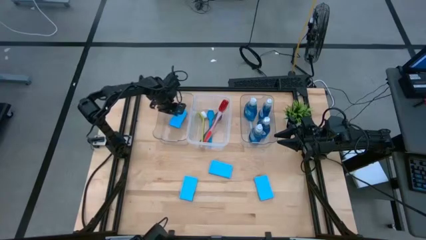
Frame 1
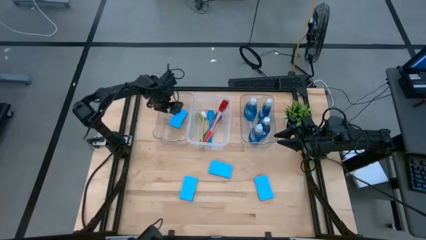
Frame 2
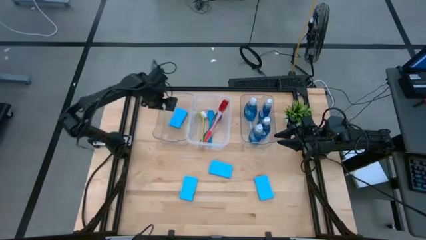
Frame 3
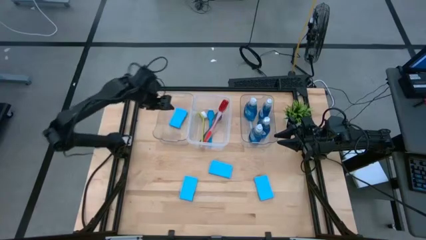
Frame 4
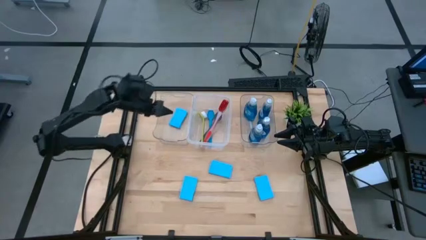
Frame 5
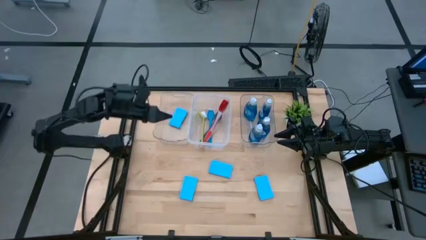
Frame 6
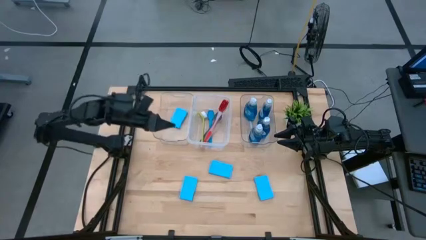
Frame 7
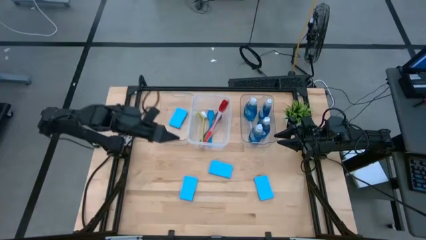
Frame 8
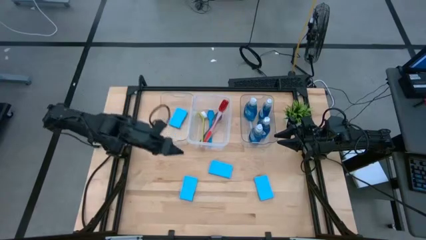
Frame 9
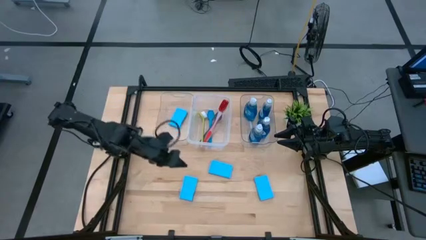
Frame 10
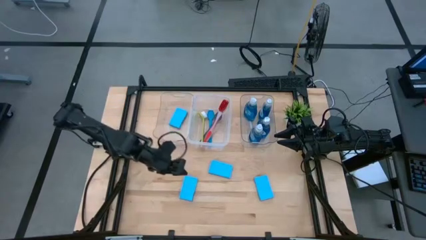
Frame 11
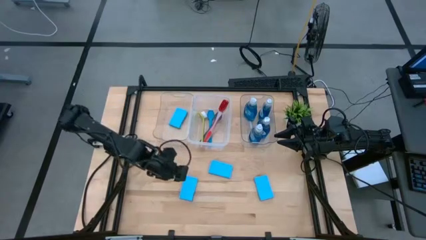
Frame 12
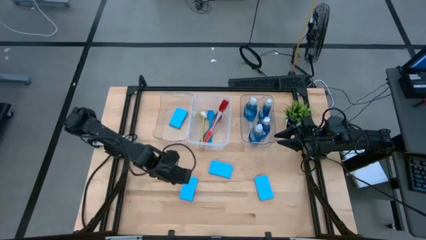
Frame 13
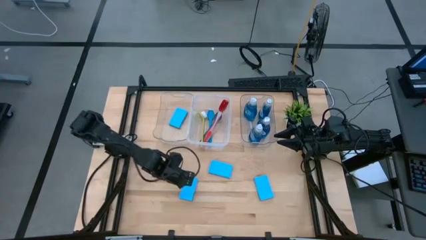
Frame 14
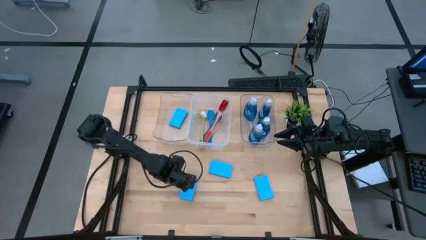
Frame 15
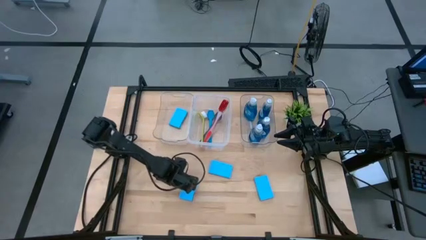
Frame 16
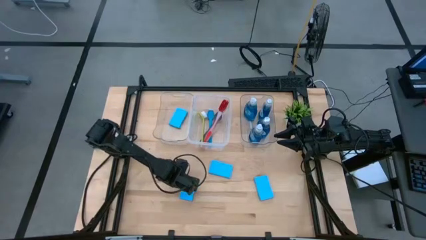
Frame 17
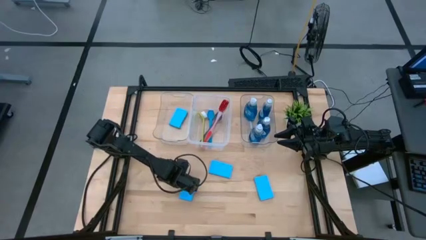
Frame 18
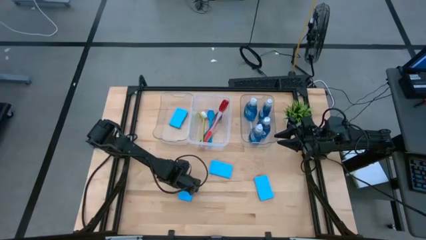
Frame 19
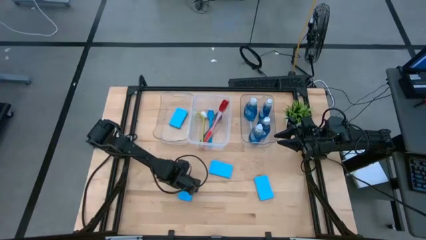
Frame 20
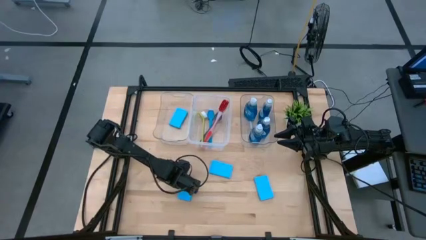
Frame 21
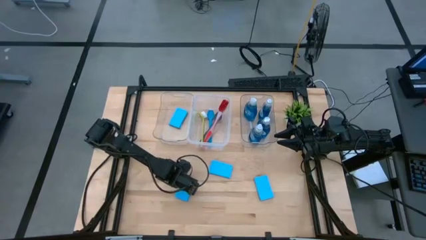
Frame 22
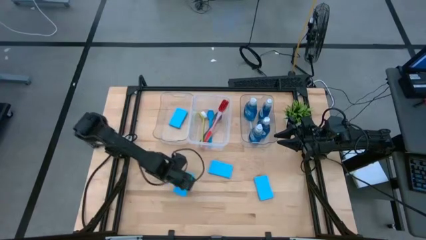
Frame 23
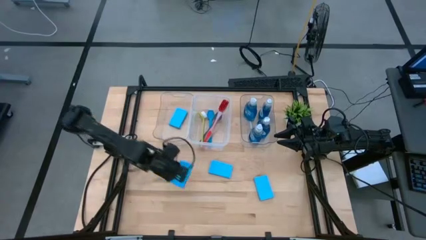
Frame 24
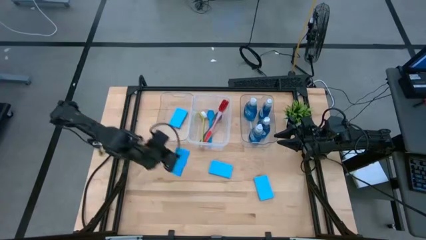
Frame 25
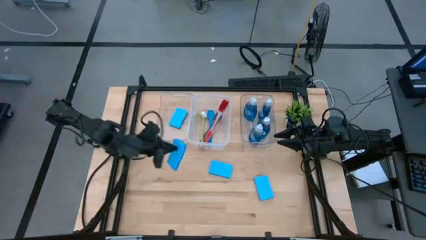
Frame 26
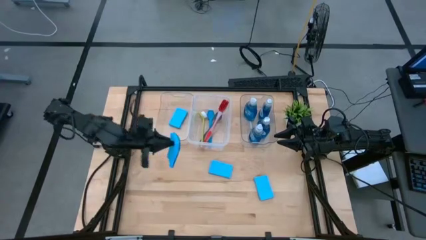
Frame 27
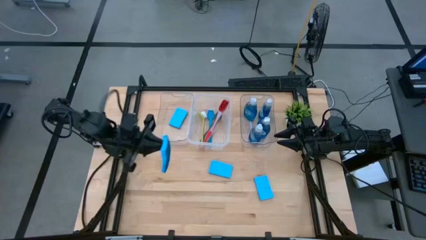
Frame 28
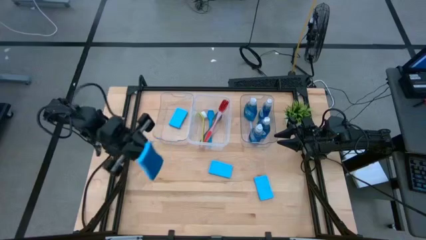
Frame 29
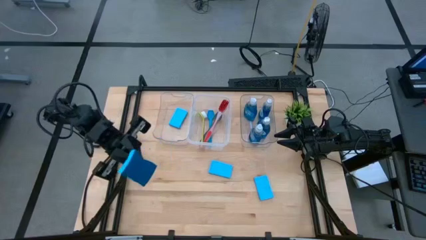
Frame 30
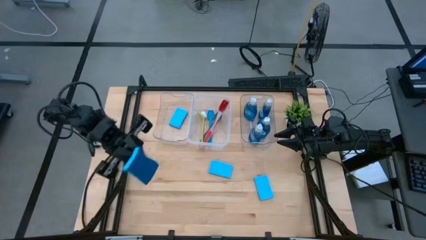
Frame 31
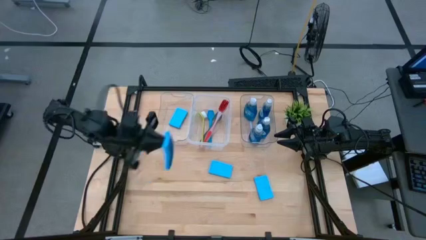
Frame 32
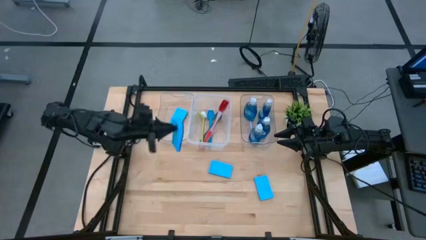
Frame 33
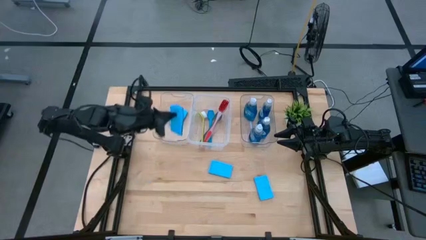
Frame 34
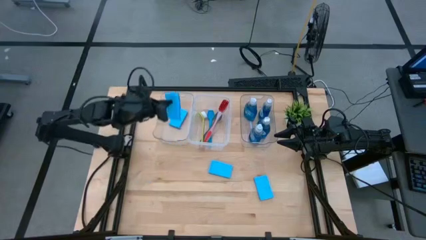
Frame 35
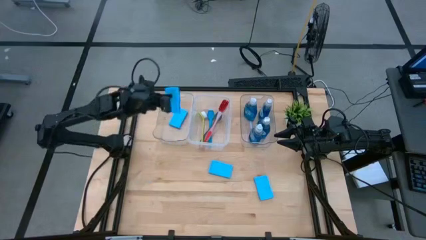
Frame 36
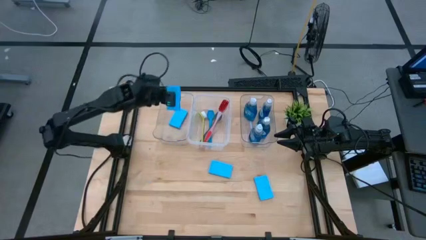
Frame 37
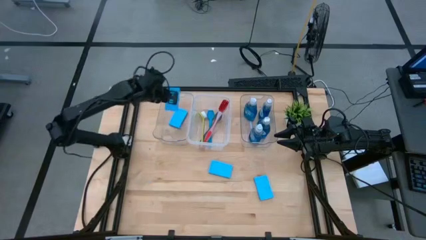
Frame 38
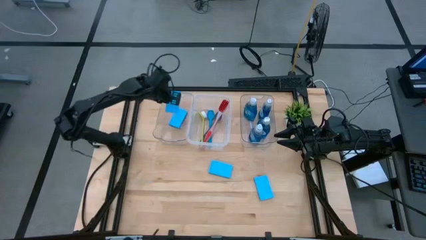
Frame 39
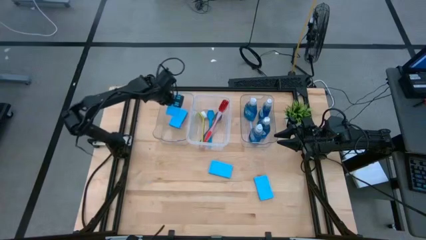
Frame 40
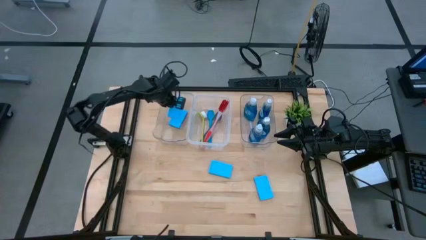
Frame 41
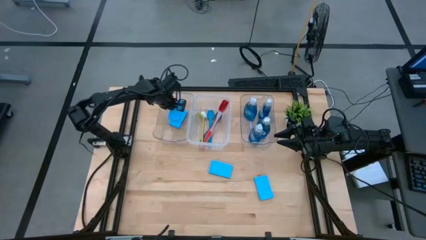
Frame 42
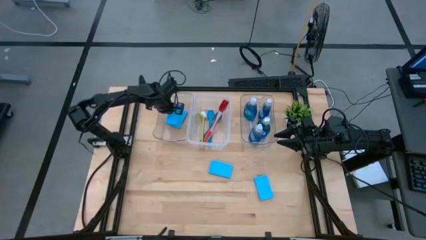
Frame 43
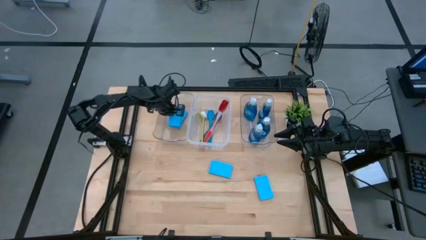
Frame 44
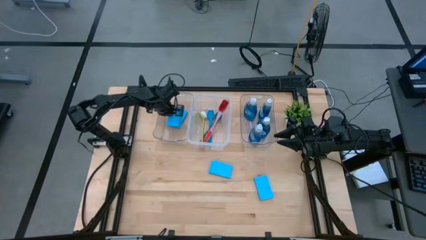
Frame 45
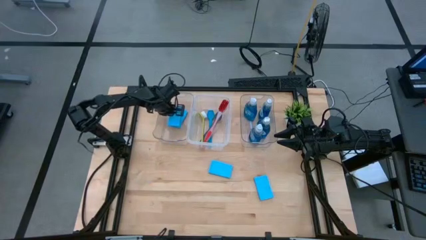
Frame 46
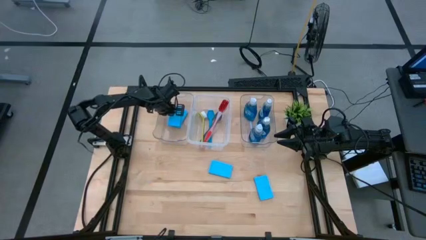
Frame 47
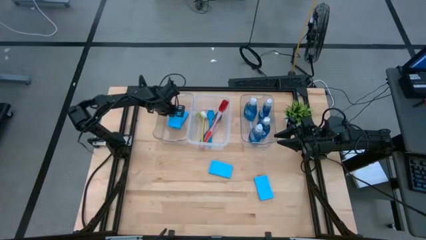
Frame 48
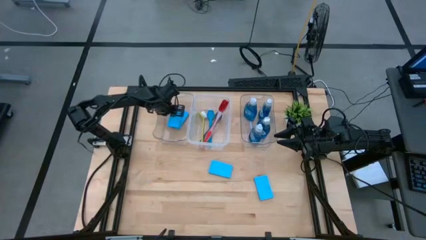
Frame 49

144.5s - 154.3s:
Task: Pick & Place Kitchen Sink Supplies
Put the sponge into the left transparent bin
